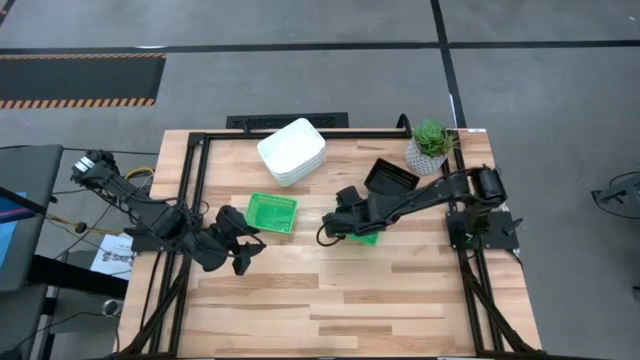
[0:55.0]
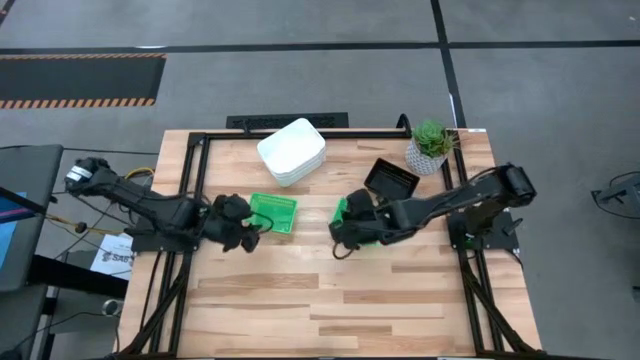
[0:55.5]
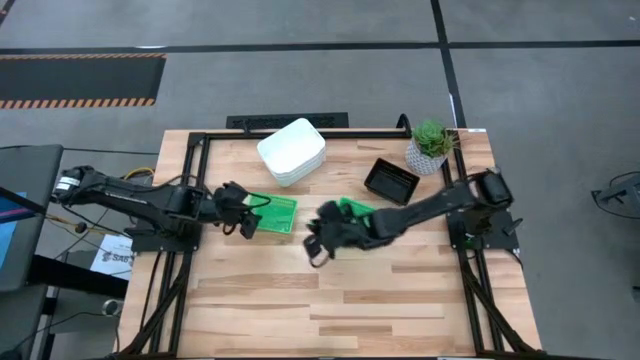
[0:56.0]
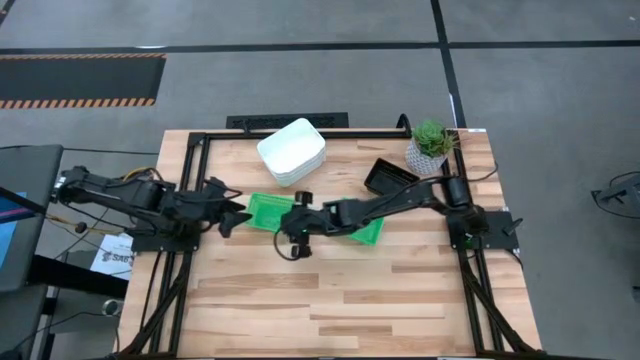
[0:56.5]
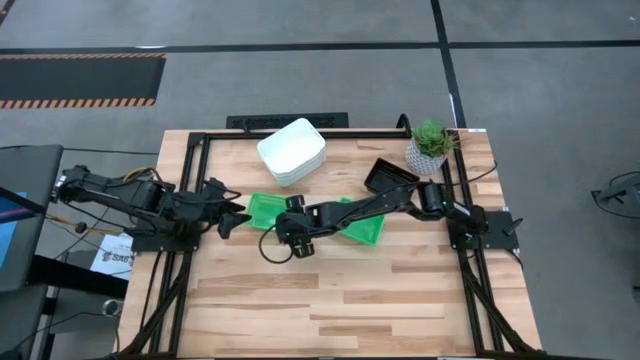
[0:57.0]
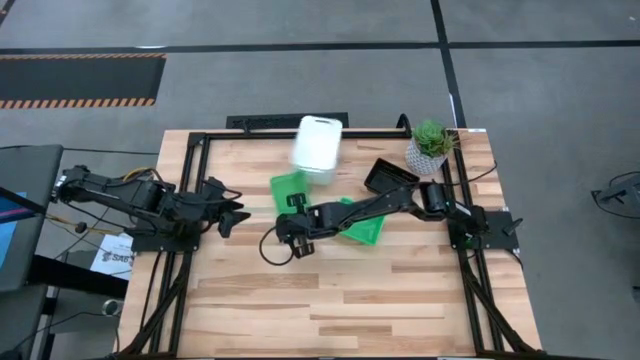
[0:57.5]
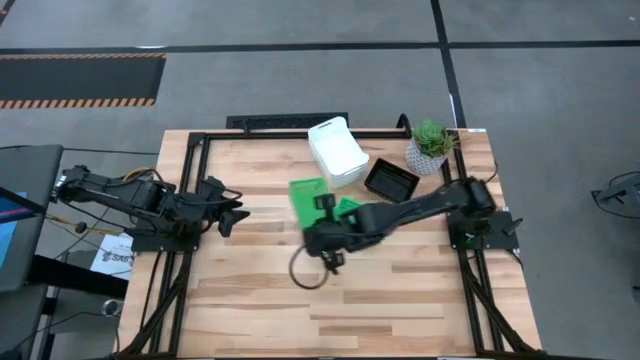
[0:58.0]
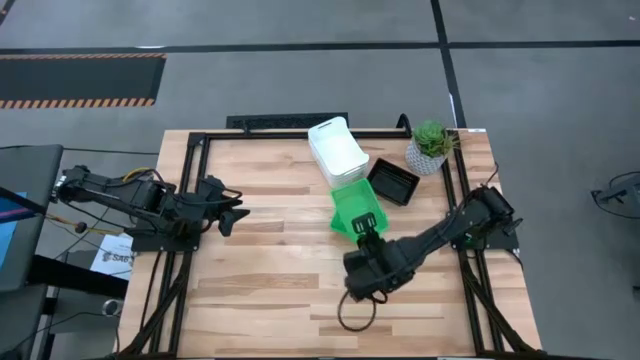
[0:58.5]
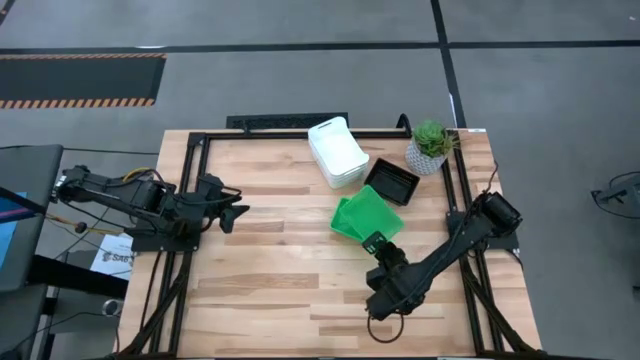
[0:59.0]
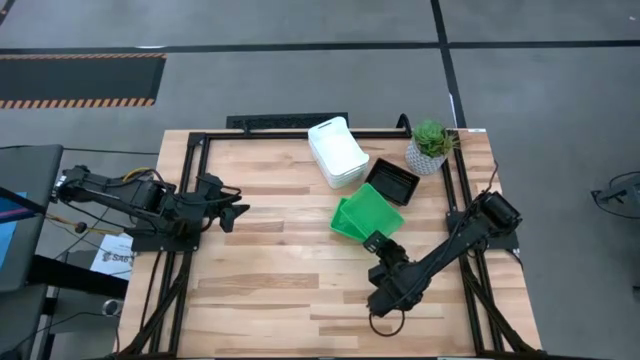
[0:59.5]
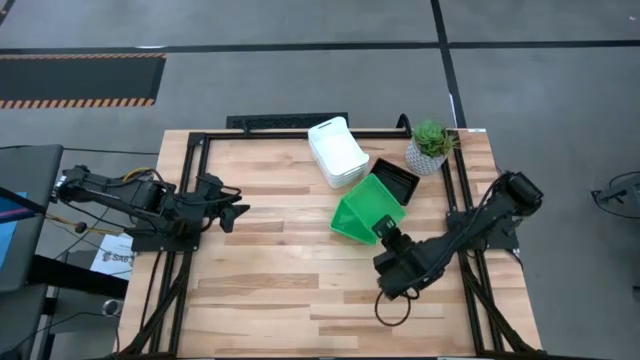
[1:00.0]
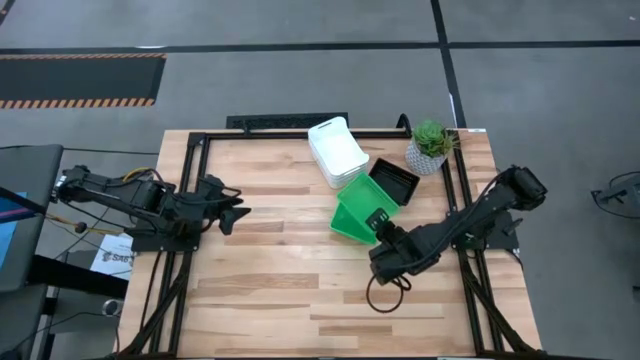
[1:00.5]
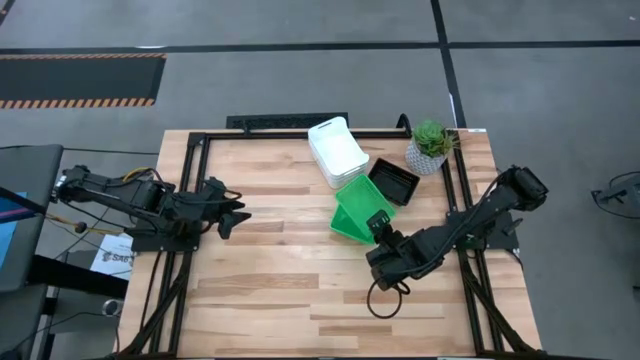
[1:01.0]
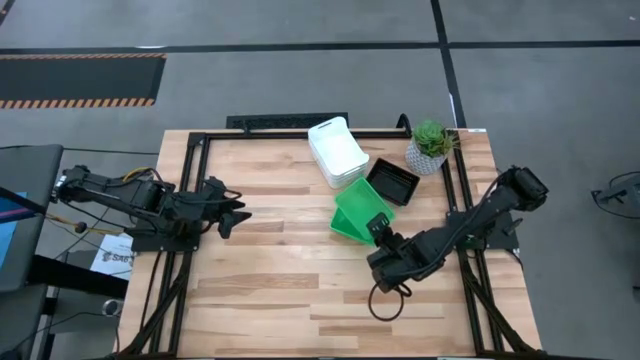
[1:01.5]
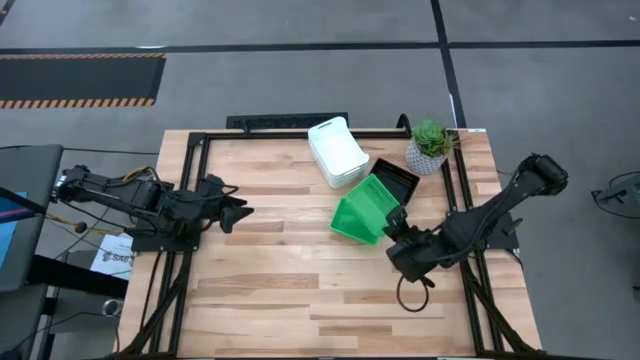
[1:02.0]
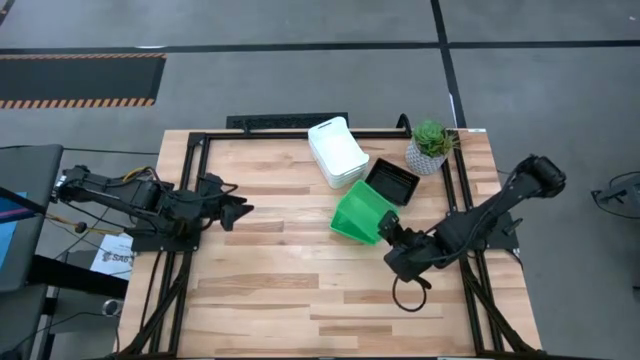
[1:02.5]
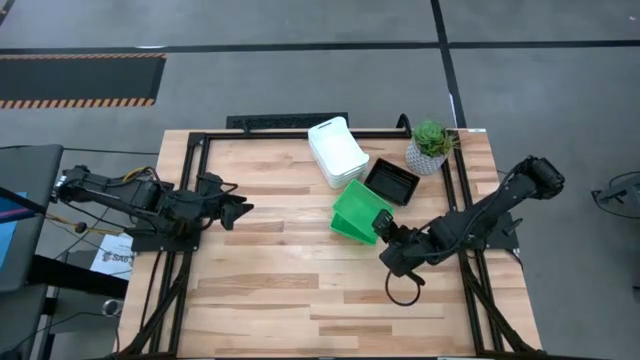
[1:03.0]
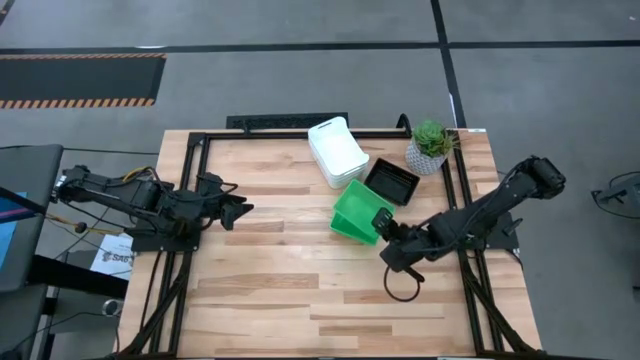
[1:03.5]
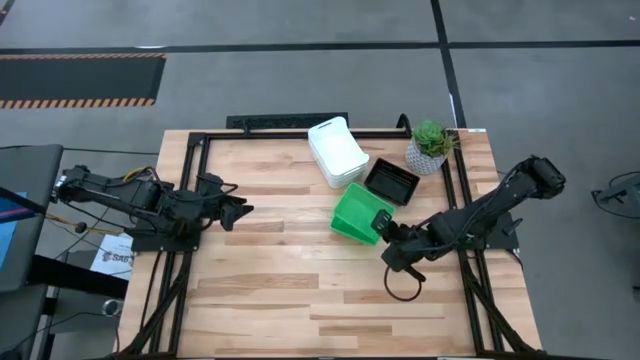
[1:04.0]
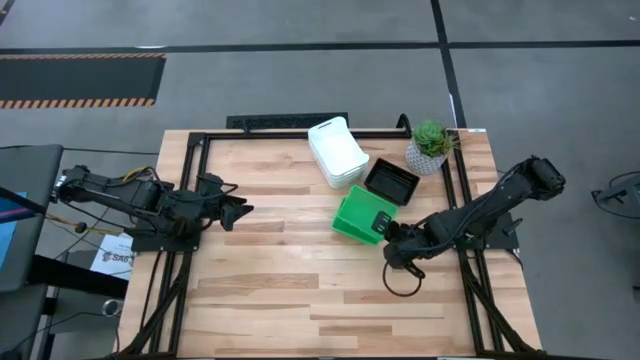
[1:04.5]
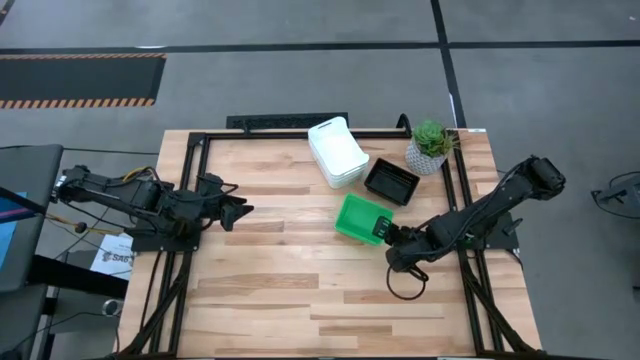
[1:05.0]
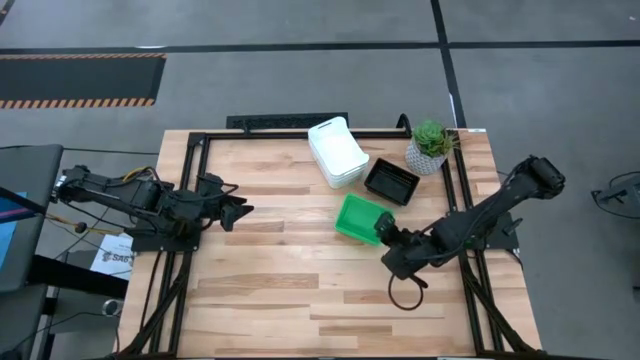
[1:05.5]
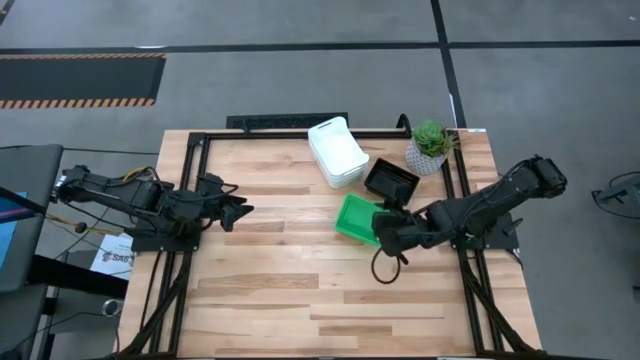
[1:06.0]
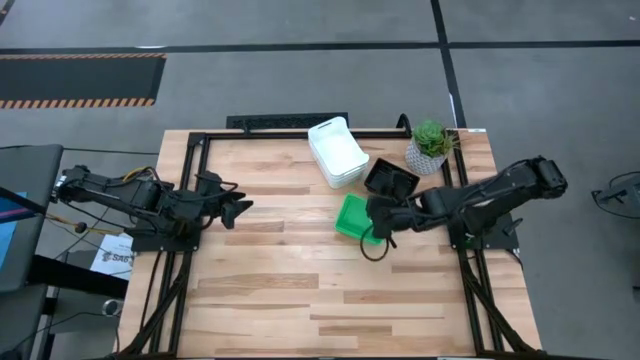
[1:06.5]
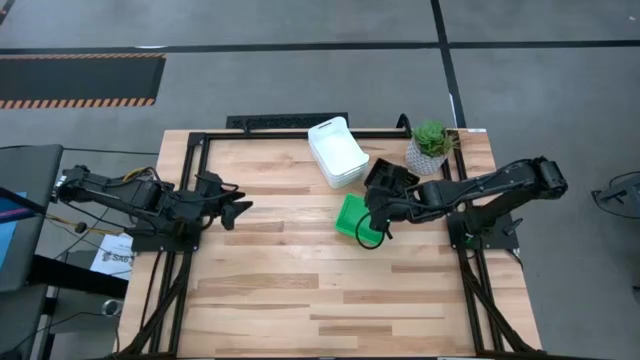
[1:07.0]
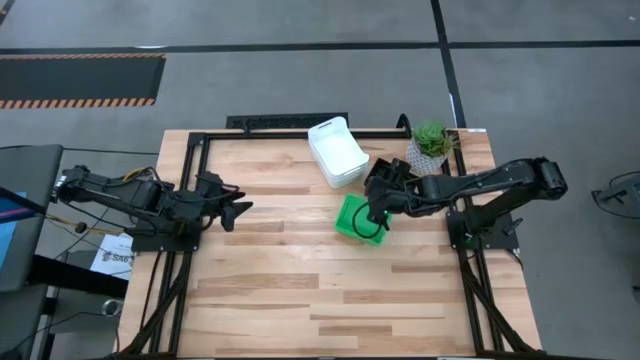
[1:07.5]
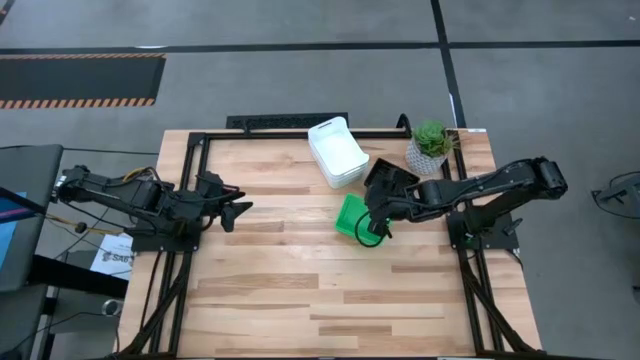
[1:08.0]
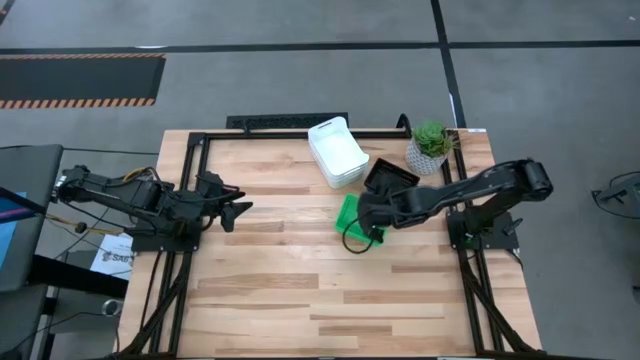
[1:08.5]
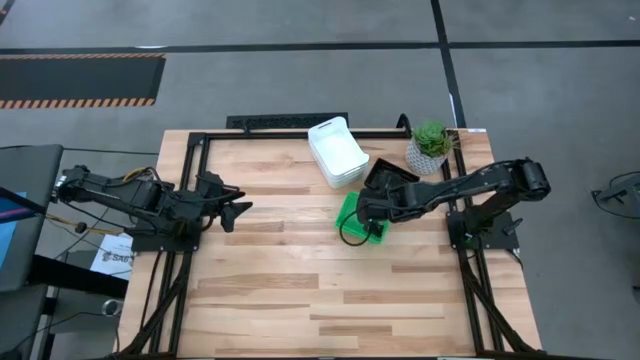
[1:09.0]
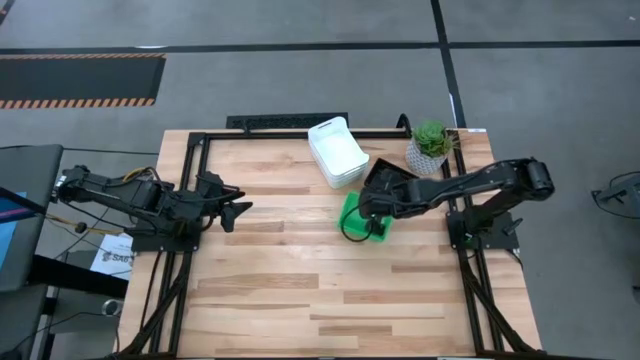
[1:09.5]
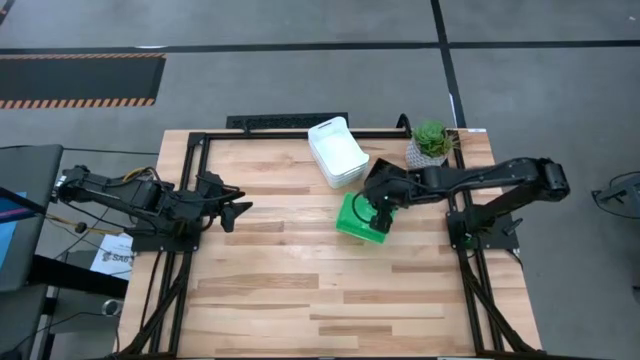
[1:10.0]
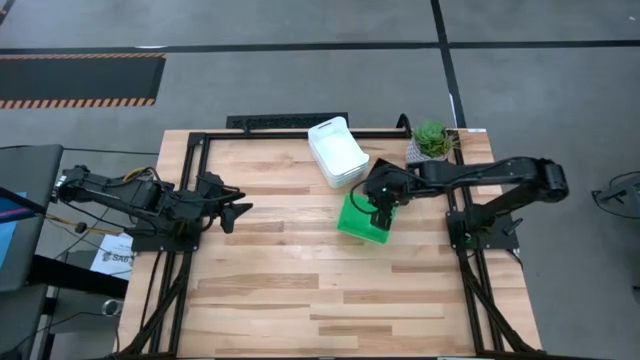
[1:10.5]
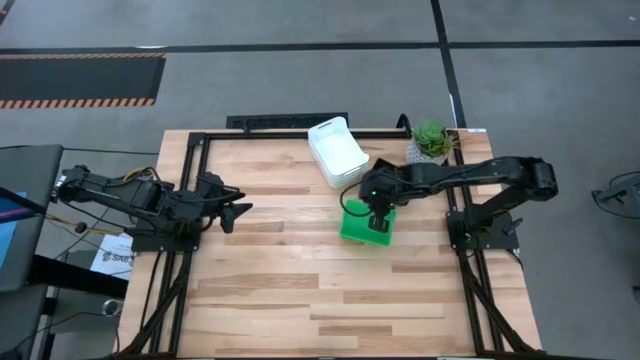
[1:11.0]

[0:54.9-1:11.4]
Stack the left green bin on the stacked green bin

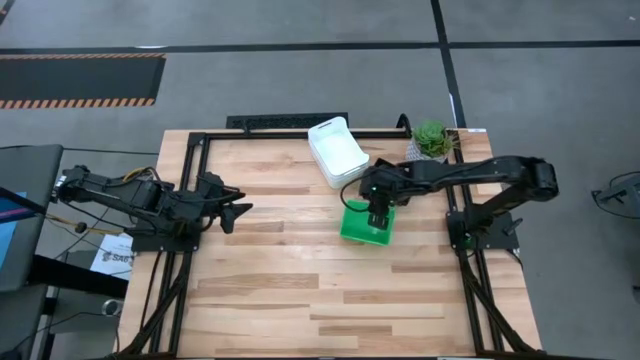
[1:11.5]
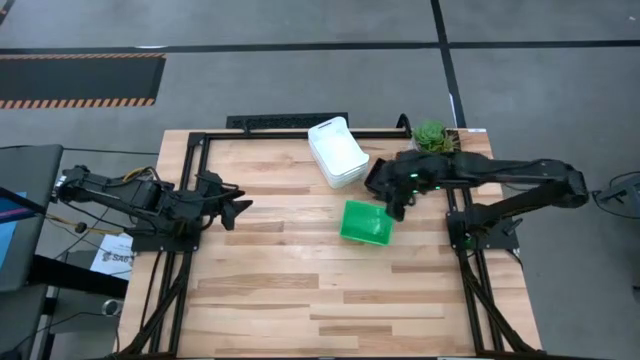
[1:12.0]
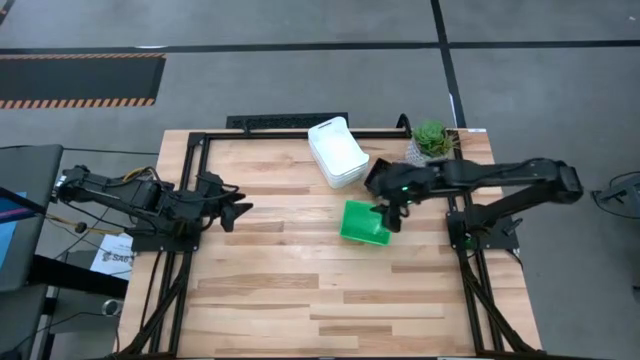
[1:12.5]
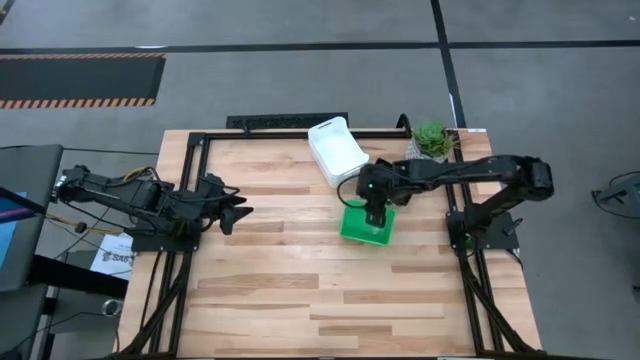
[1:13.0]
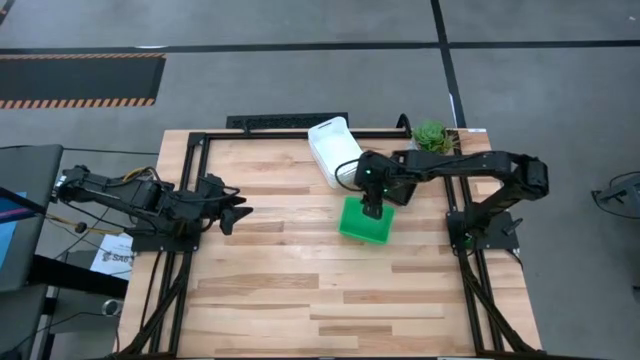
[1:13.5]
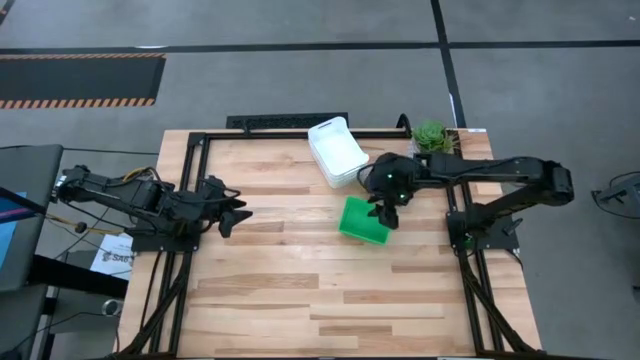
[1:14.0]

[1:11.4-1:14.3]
Stack the left green bin on the stacked green bin

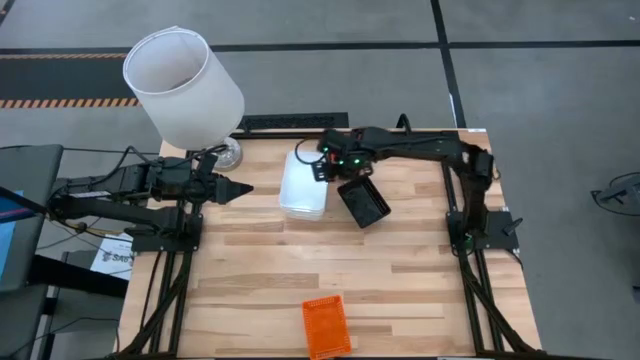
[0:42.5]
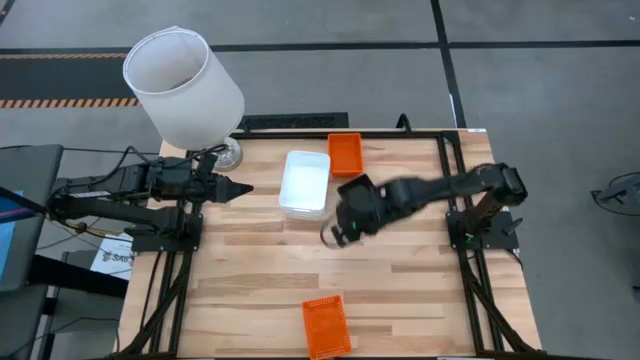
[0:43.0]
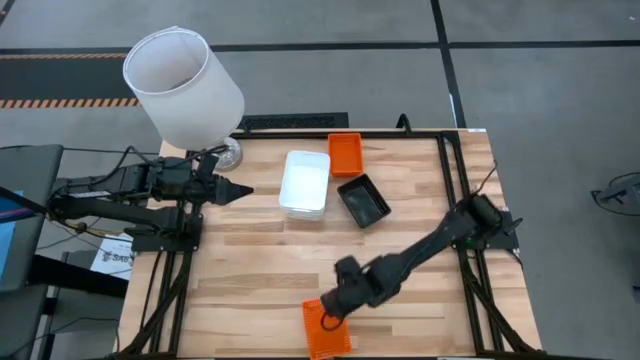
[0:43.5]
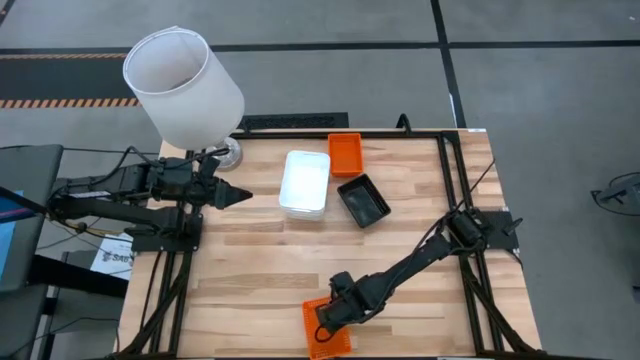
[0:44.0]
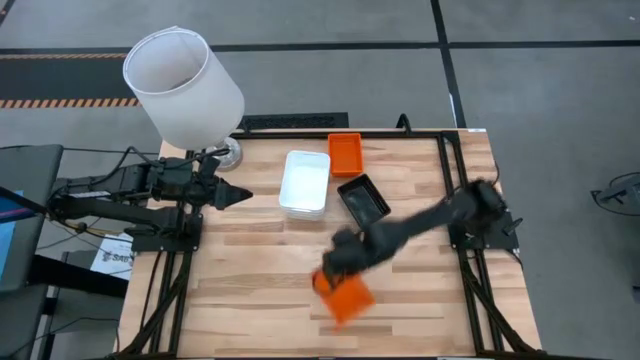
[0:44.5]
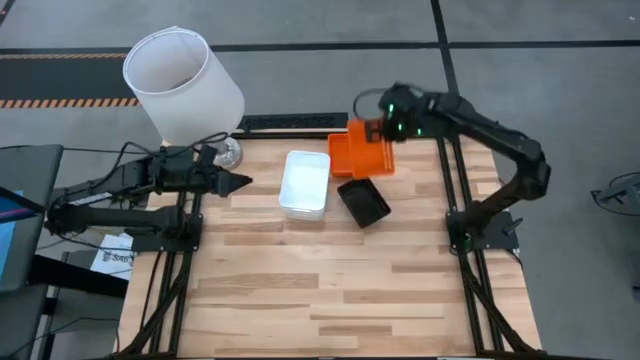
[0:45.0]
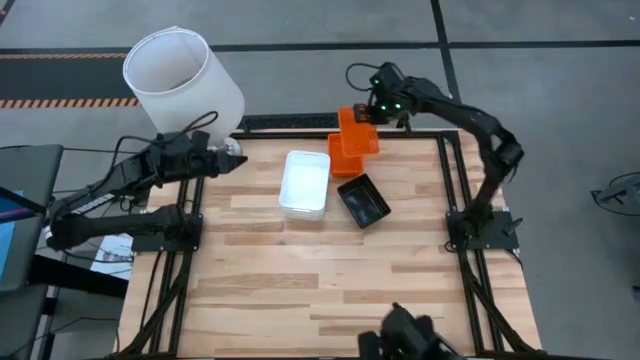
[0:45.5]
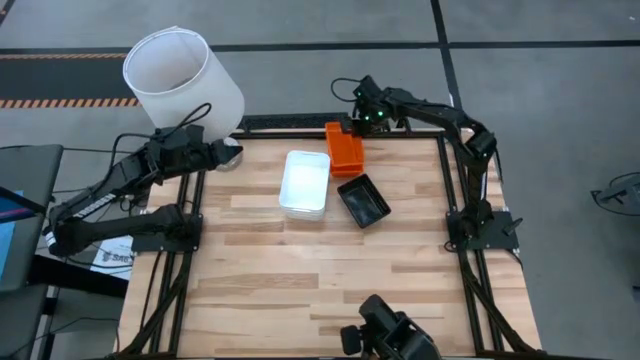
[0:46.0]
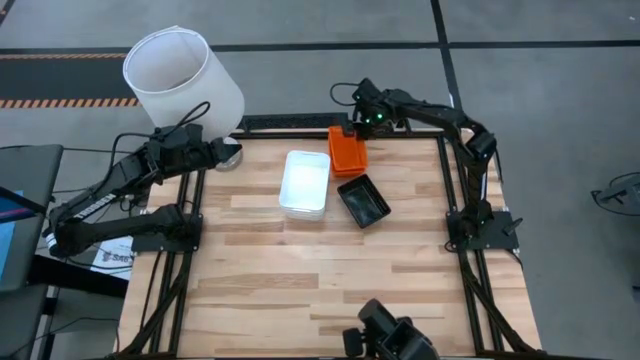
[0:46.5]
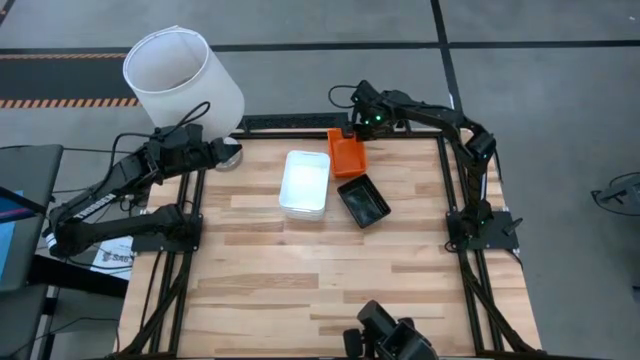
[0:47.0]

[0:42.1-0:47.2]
Stack the orange bin on the top orange bin
